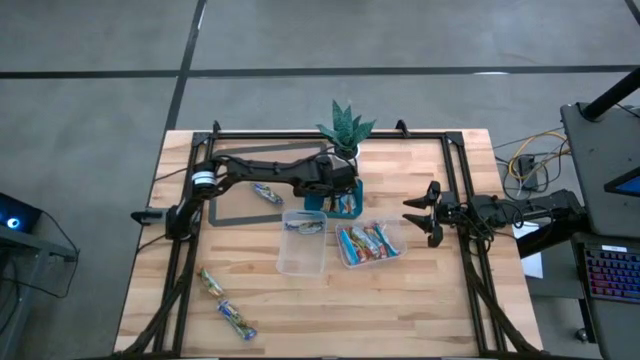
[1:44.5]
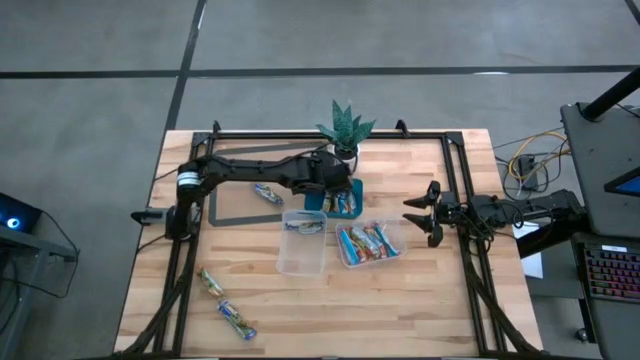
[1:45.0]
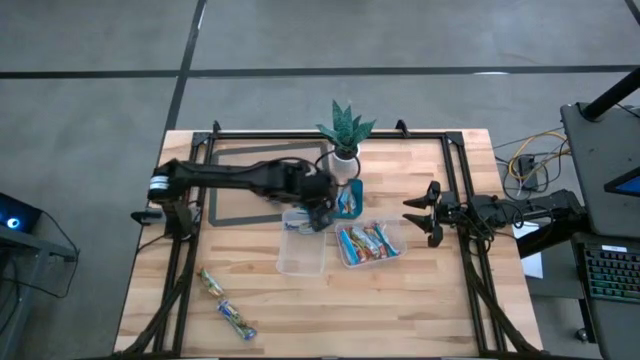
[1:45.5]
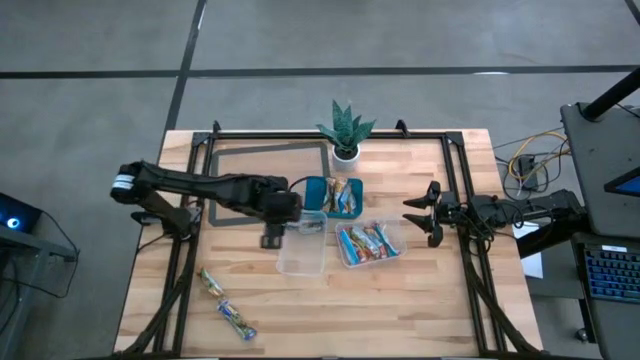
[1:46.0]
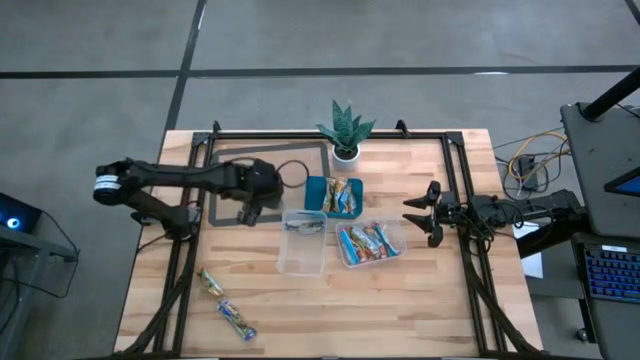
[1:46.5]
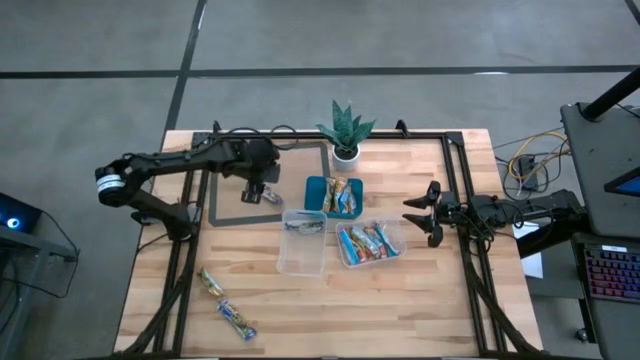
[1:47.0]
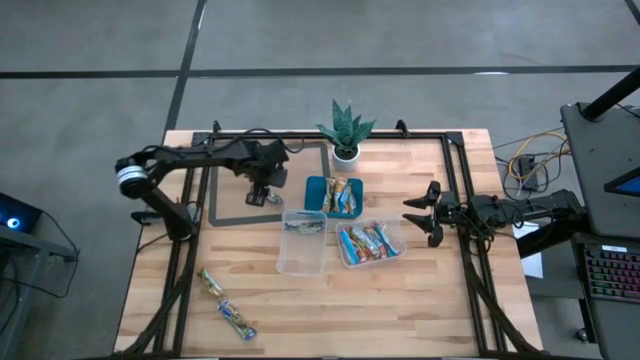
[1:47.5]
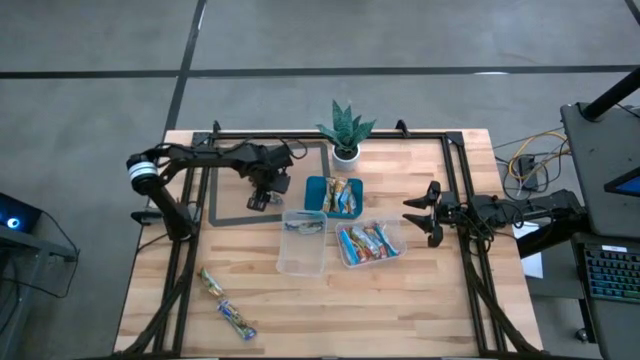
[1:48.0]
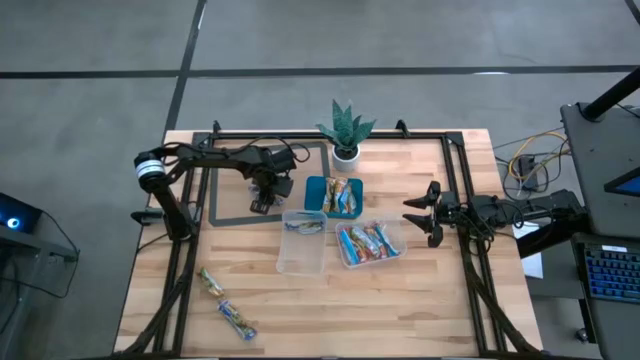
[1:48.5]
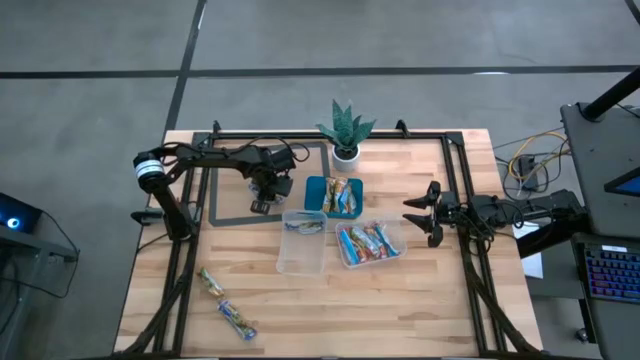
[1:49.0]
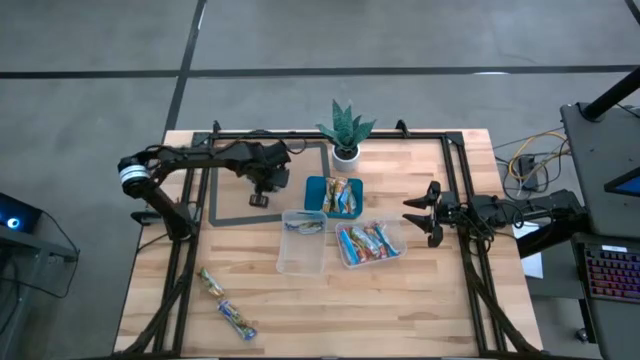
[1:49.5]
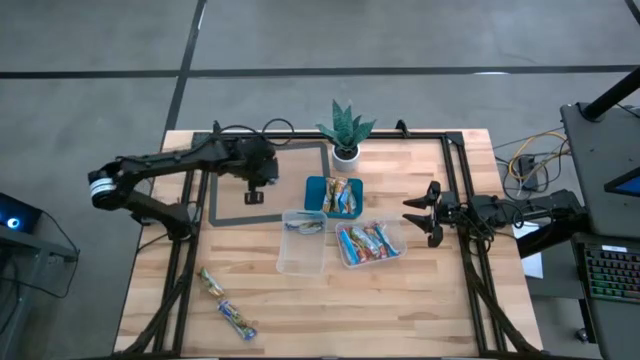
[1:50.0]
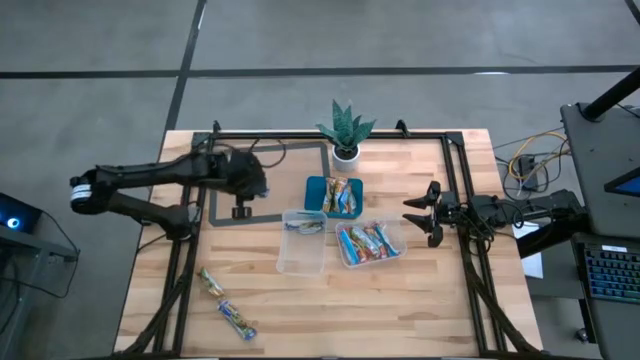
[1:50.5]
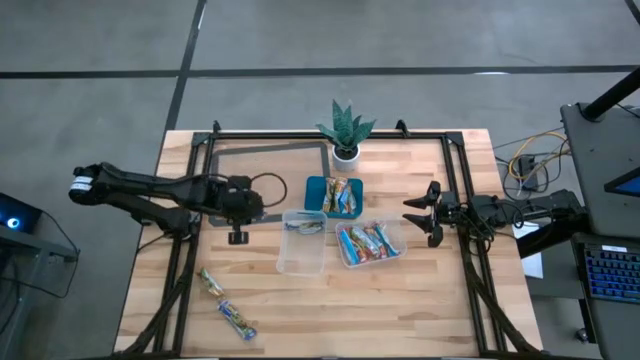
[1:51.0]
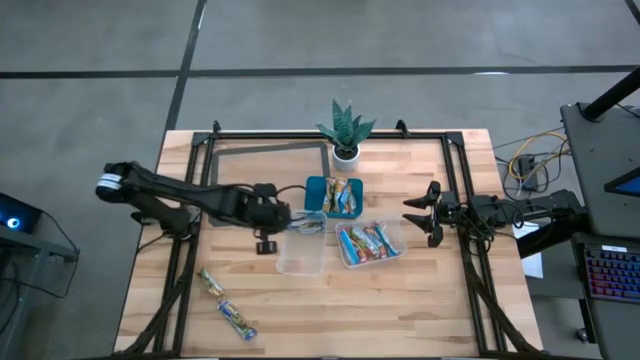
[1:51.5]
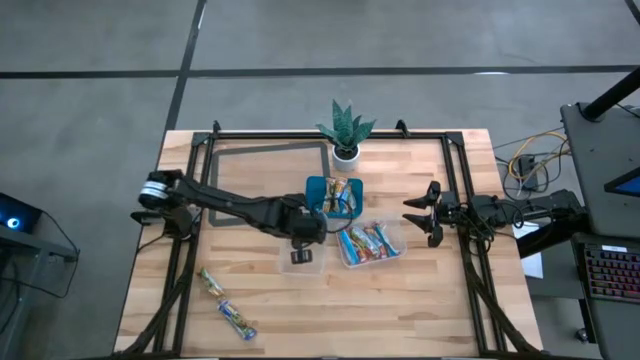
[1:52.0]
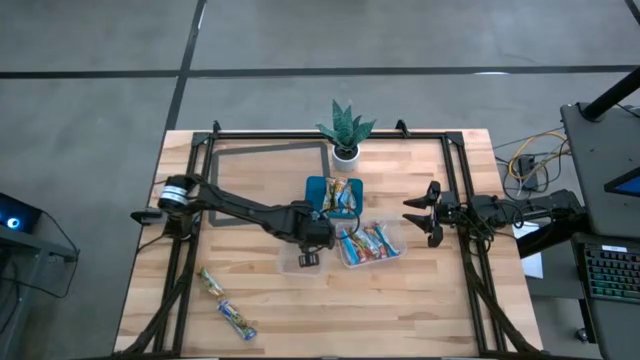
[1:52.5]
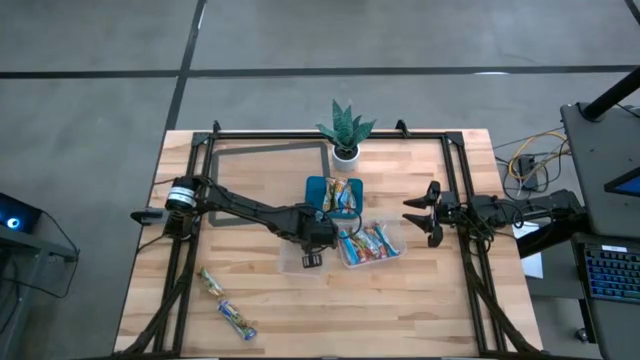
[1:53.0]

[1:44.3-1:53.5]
Task: Pick and place Granola Bars by type
Put the blue granola bar into the left transparent bin

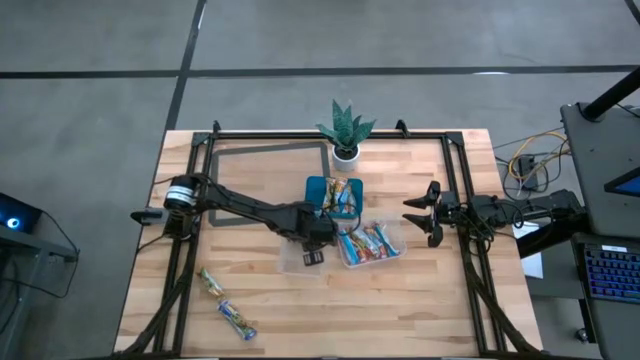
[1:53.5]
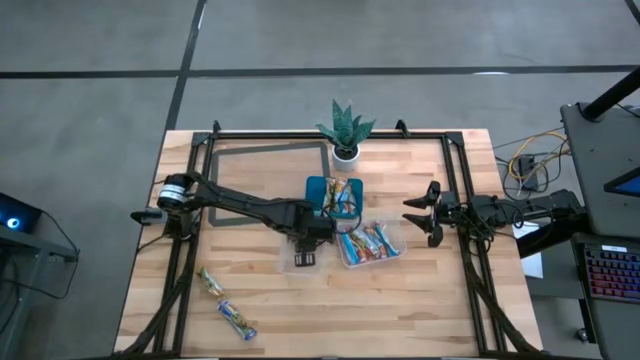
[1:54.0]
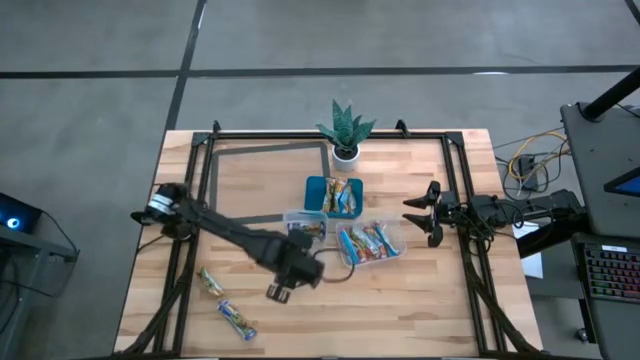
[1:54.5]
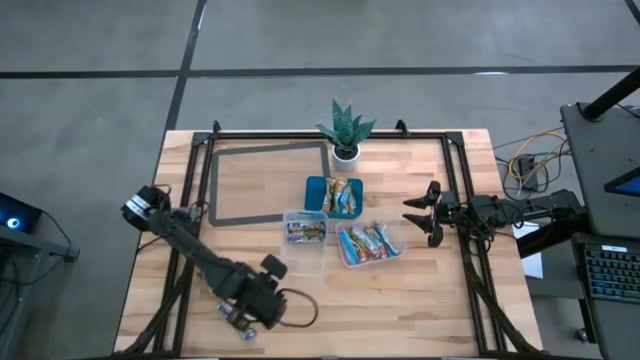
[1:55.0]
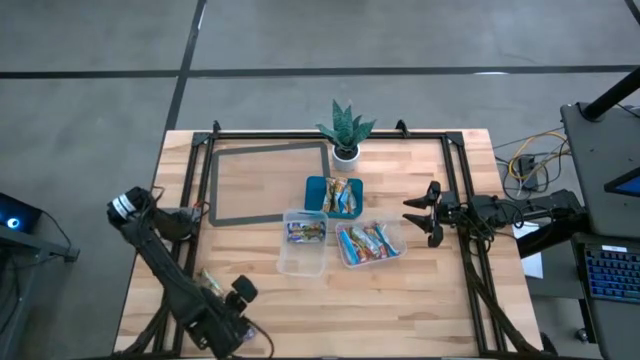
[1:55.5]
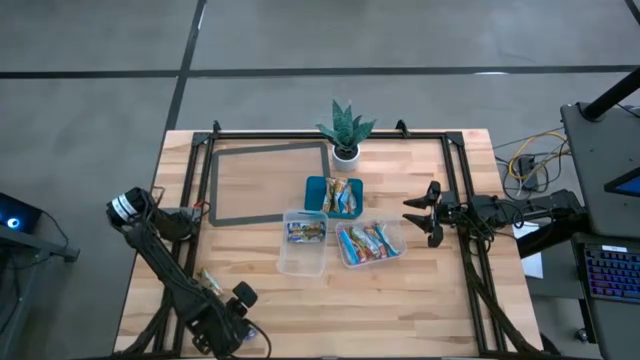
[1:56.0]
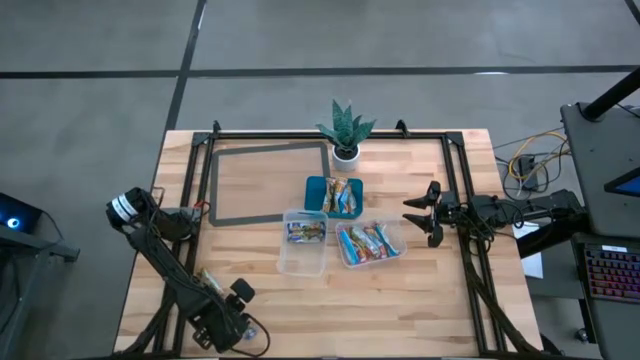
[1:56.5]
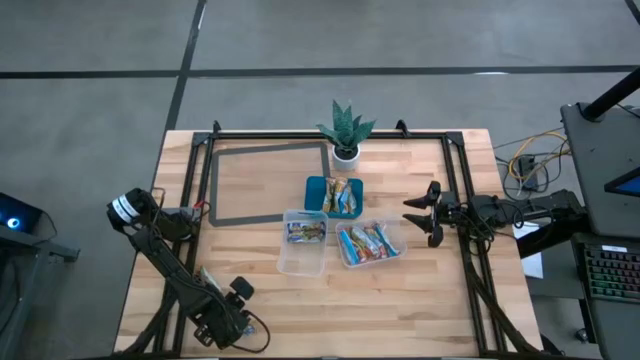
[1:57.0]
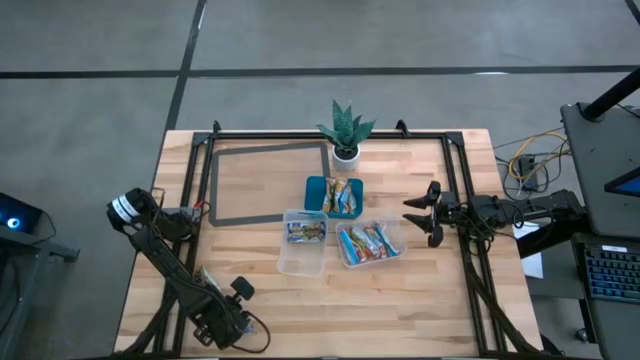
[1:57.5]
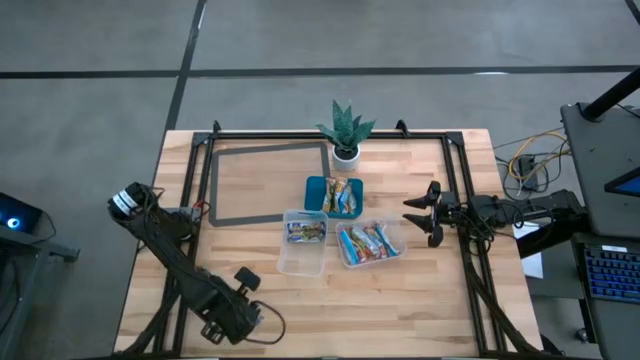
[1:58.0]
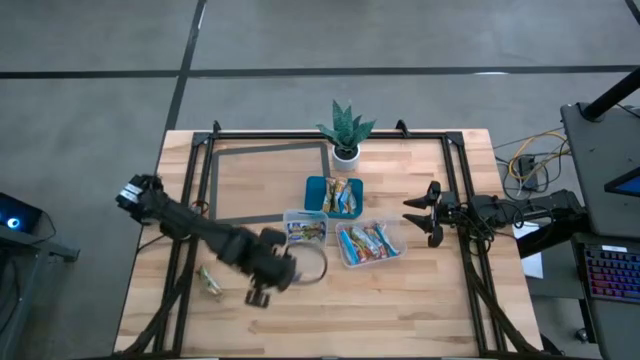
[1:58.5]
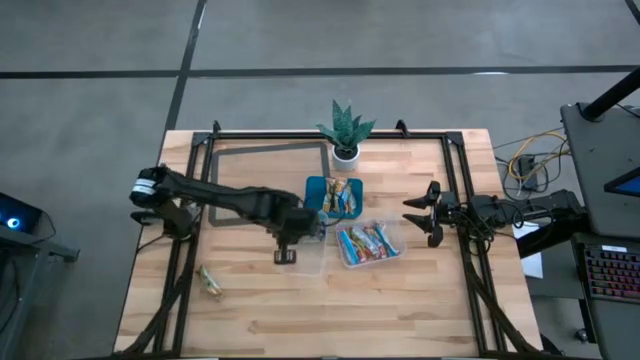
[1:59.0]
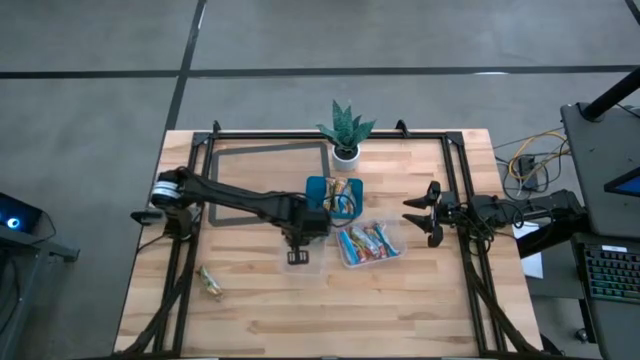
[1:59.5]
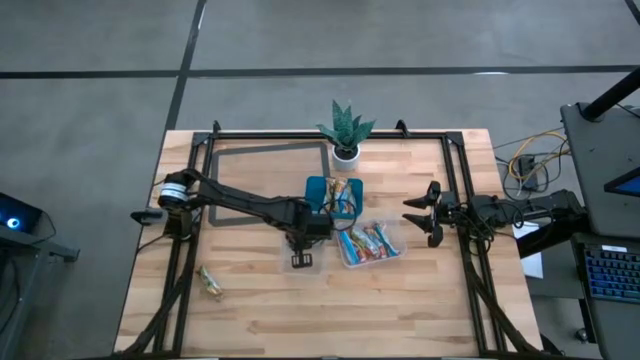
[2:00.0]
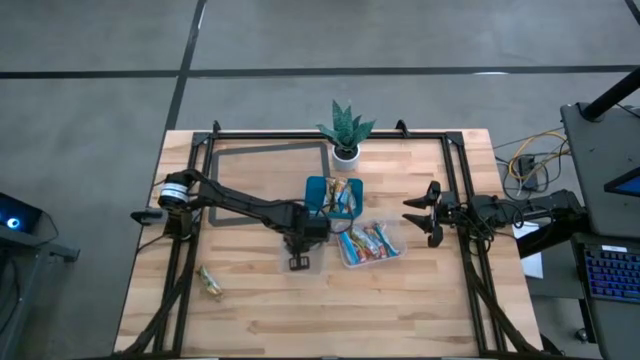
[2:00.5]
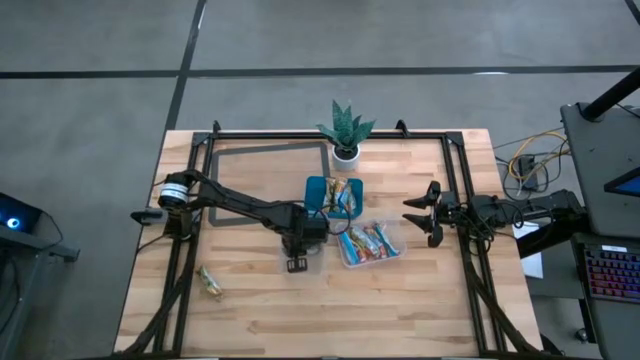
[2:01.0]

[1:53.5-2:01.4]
Put the blue granola bar into the left transparent bin

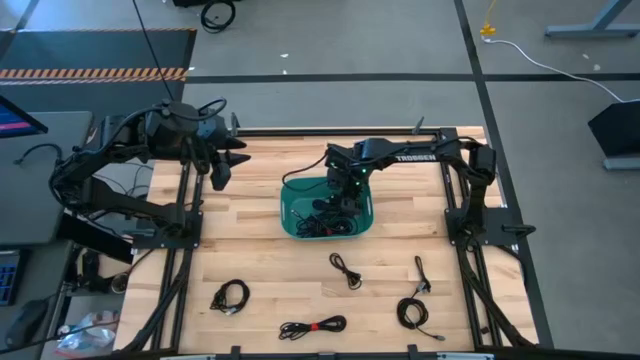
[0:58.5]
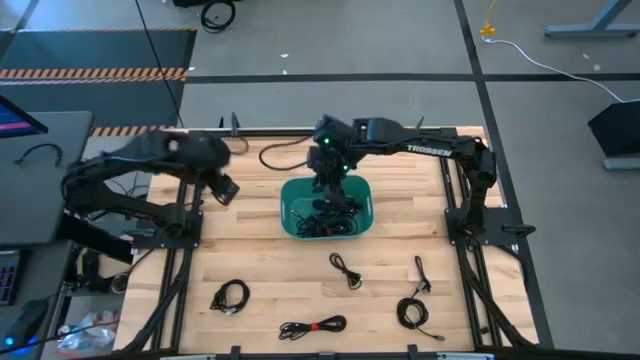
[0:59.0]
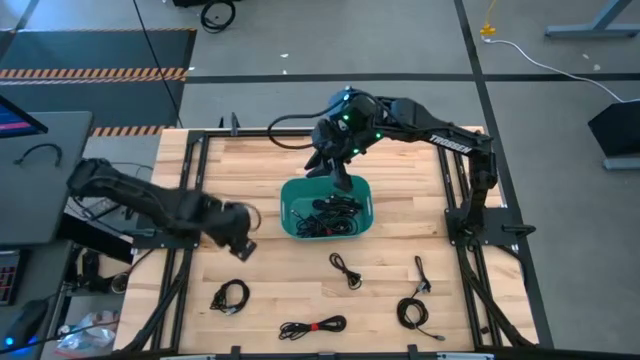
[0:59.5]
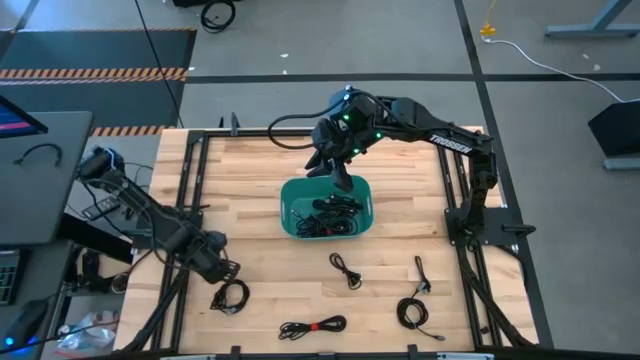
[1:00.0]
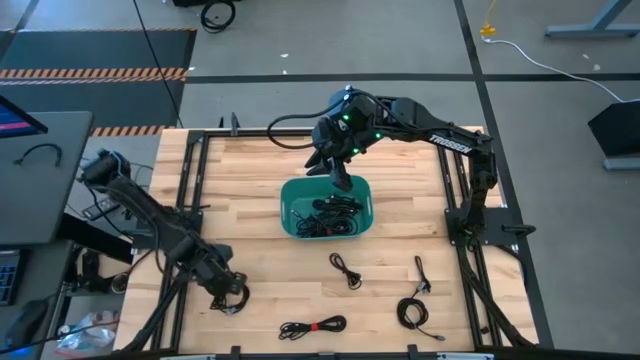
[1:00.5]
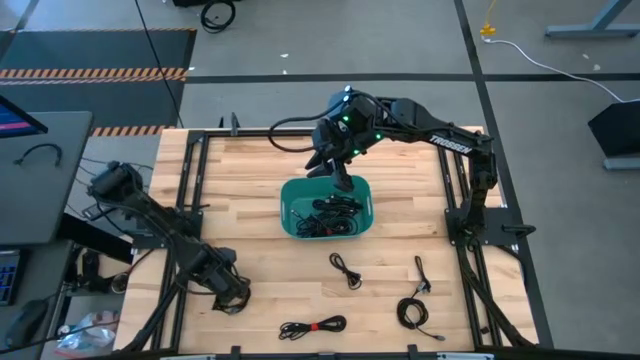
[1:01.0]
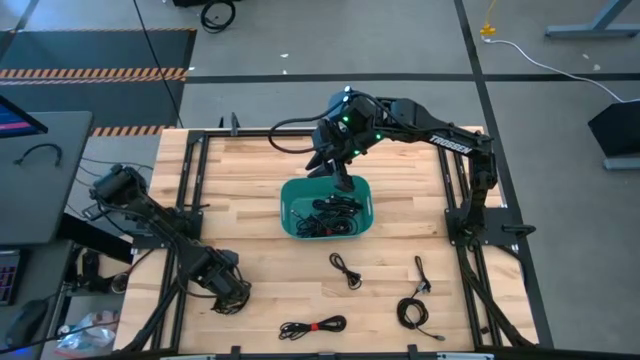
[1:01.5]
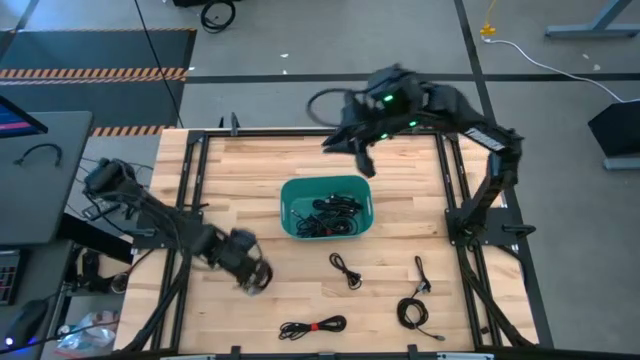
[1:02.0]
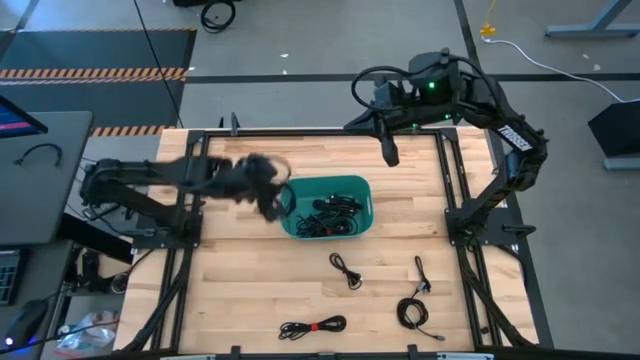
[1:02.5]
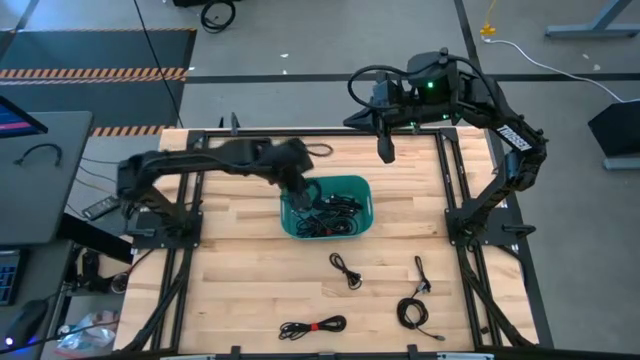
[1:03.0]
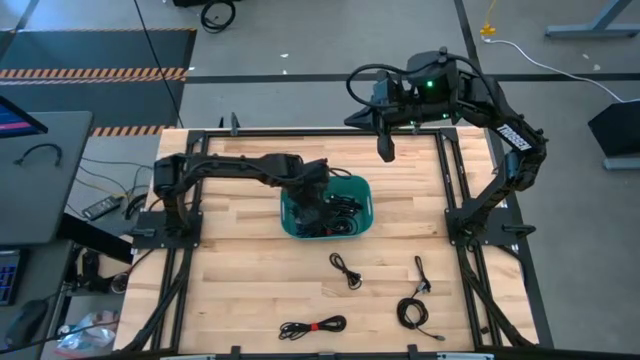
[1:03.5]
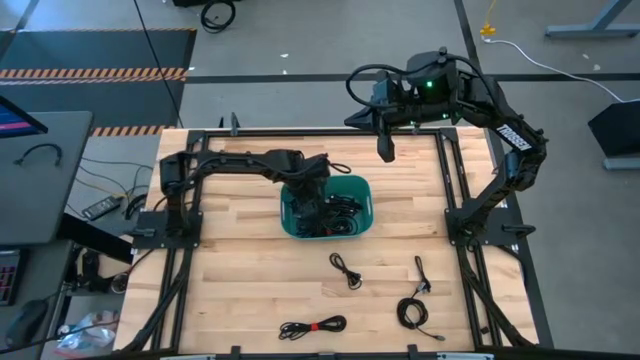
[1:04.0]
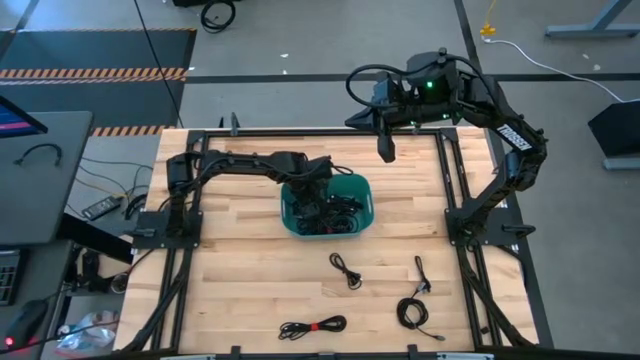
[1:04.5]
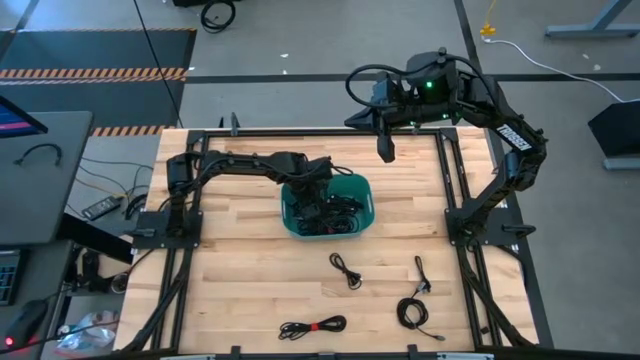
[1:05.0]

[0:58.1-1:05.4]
Task: Pick and place USB-C Cables
Put the black charger cable into the green bin
